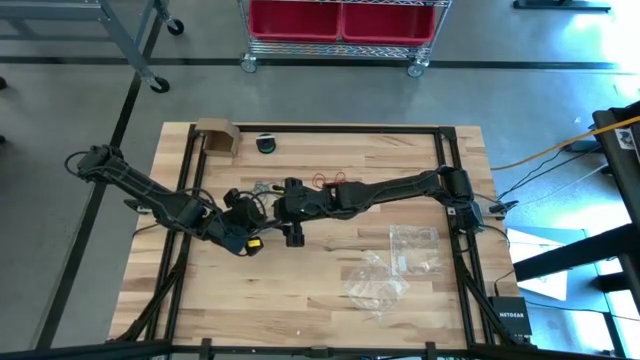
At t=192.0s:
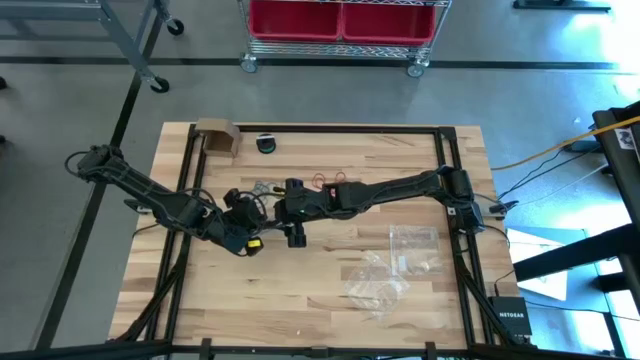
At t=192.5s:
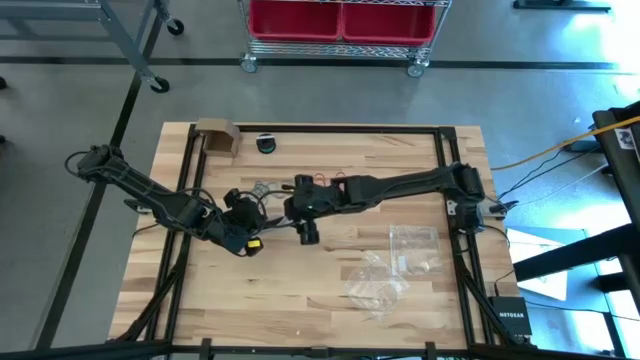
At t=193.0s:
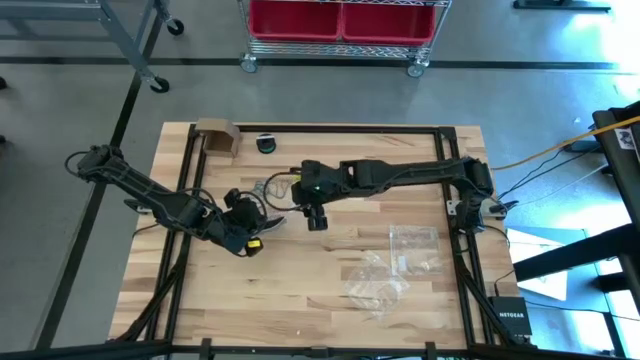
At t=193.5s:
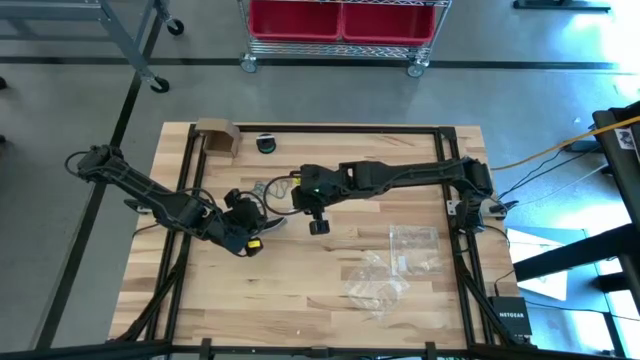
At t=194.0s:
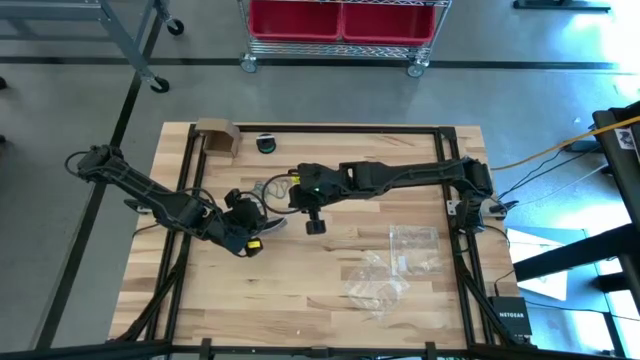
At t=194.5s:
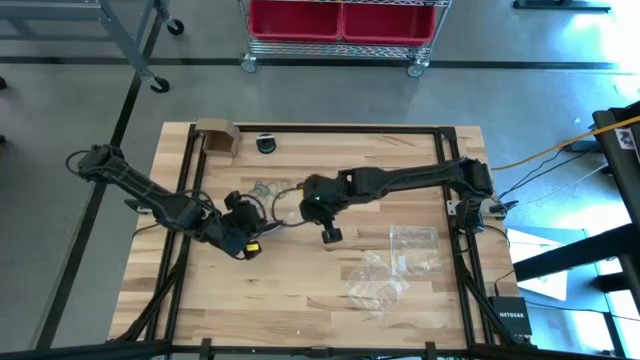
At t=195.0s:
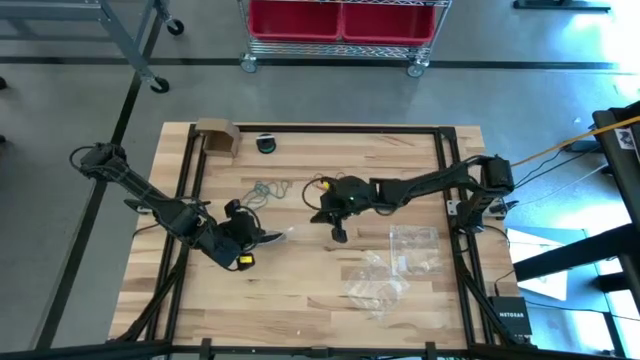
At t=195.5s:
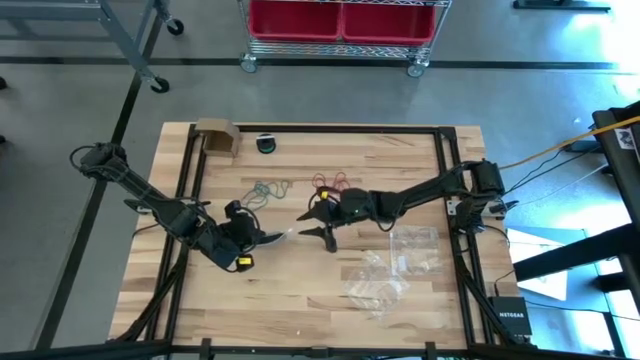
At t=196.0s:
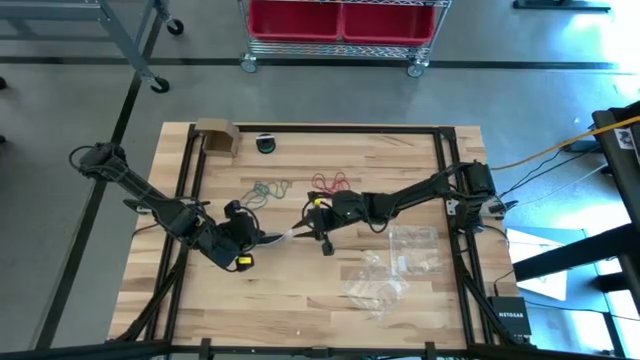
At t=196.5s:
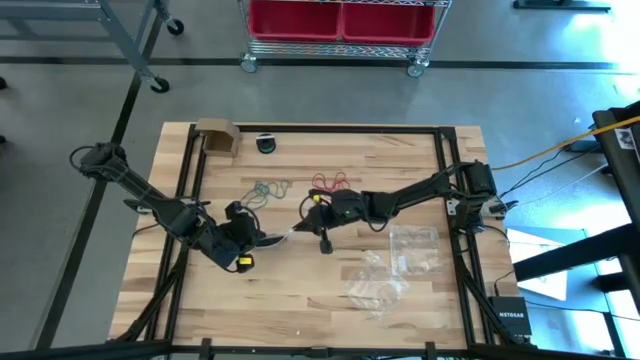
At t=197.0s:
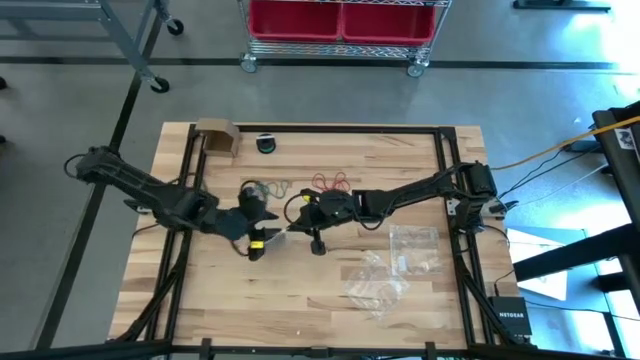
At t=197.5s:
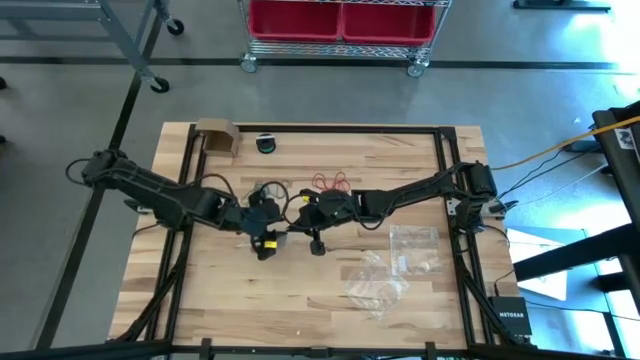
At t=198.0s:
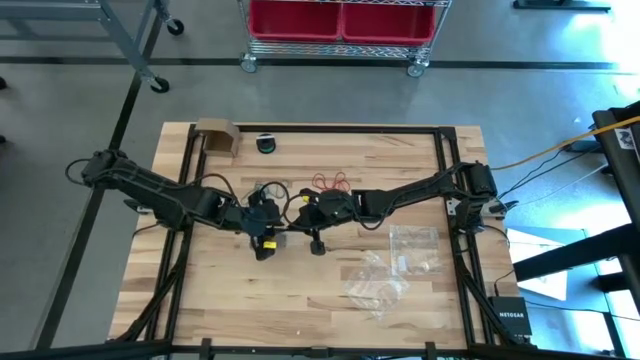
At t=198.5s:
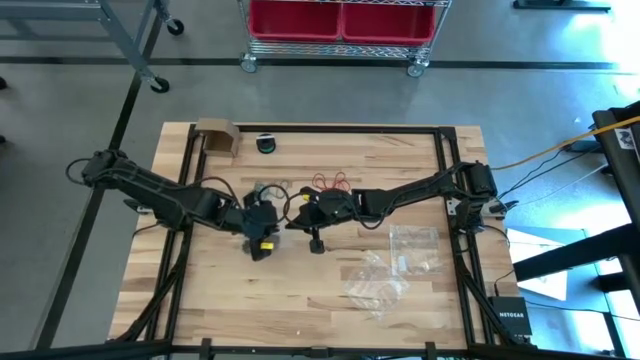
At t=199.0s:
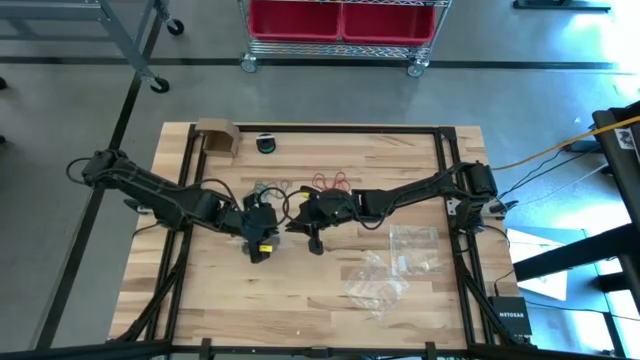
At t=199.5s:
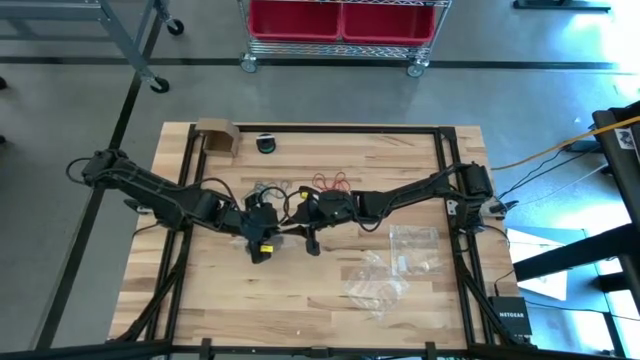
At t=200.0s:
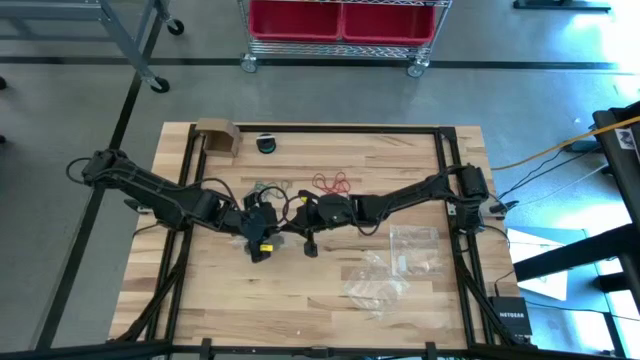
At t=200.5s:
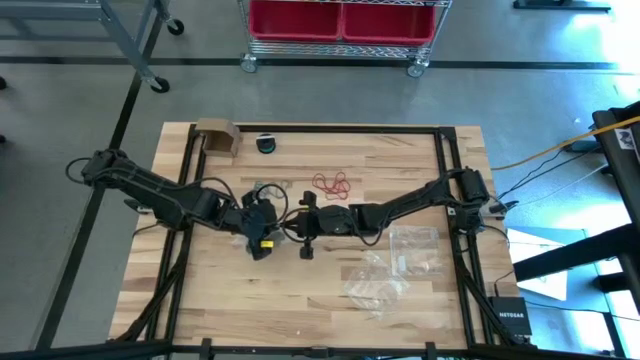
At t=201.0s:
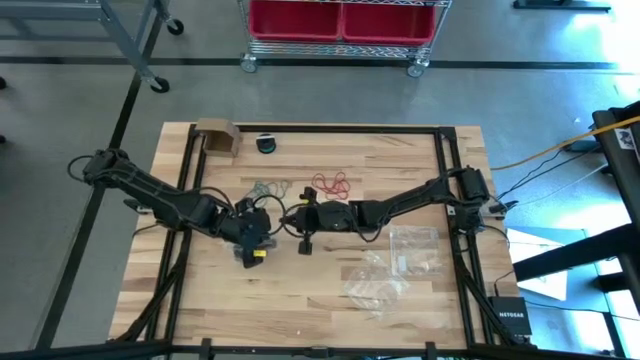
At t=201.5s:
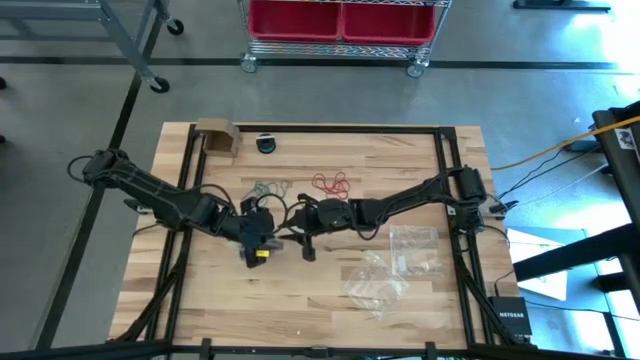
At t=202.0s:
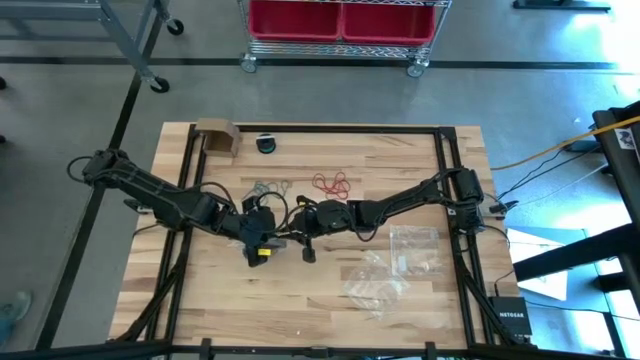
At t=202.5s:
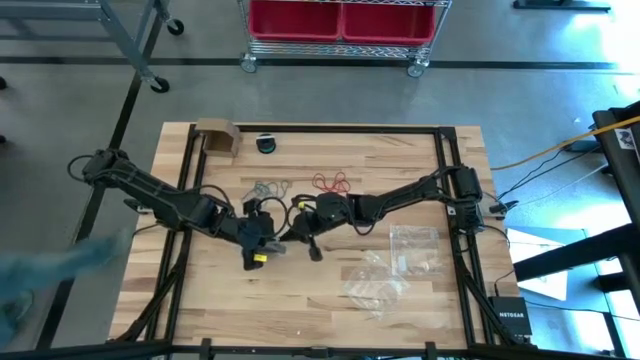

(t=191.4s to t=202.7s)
Task: Sort rubber bands
Close the transparent zip bag

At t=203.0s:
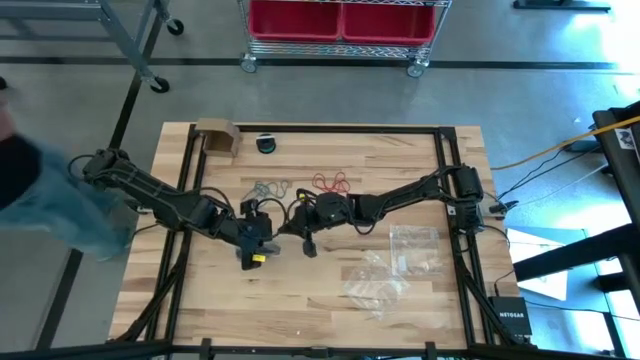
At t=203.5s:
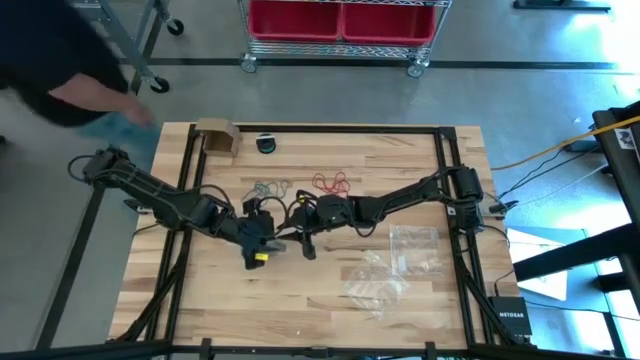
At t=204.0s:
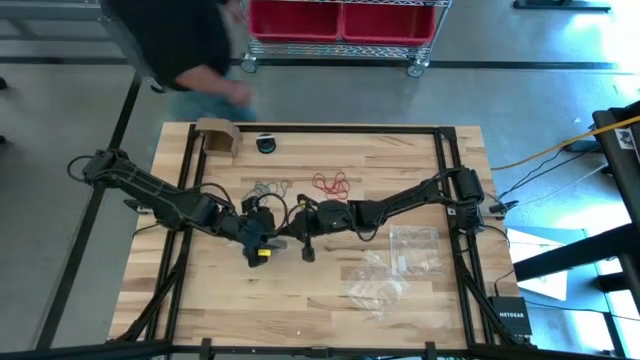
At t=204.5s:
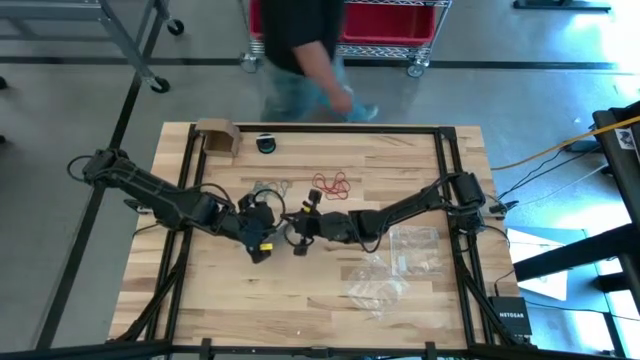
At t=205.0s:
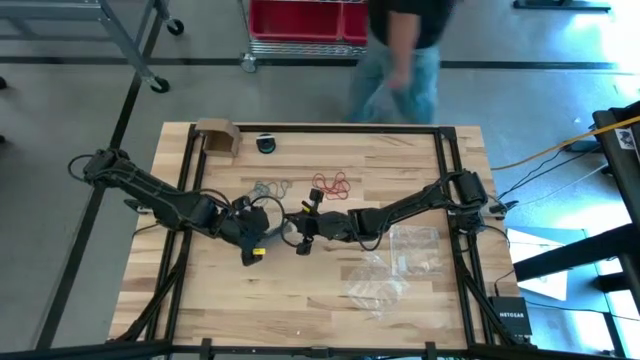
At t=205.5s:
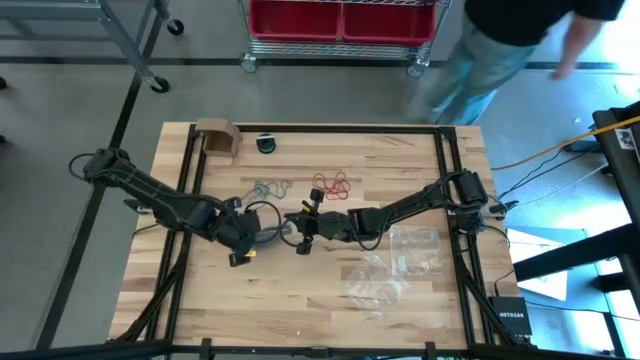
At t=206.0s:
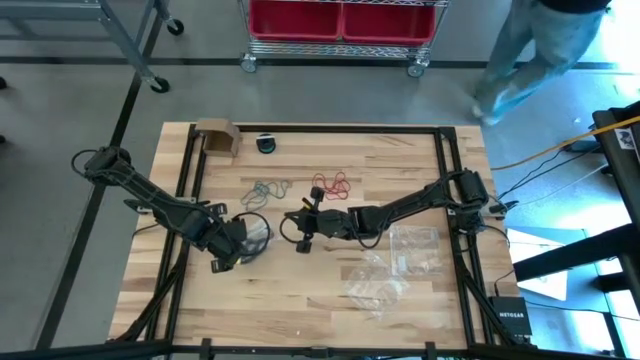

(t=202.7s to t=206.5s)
Close the transparent zip bag

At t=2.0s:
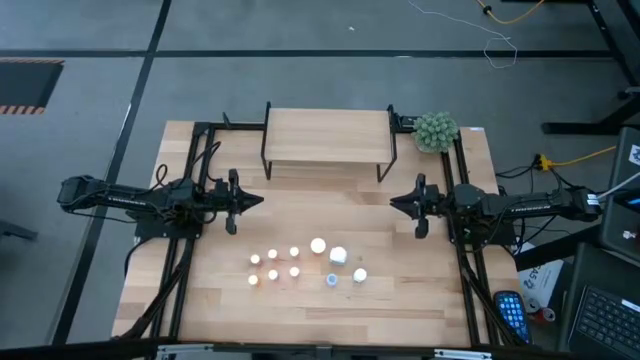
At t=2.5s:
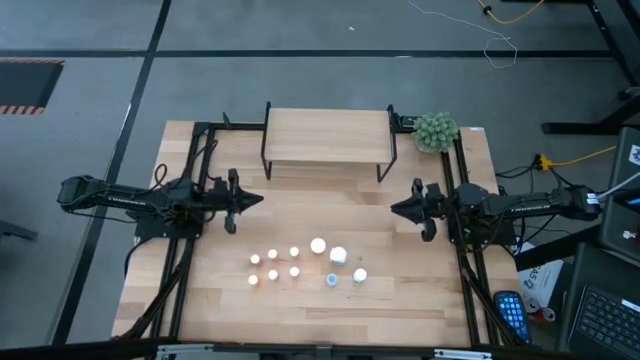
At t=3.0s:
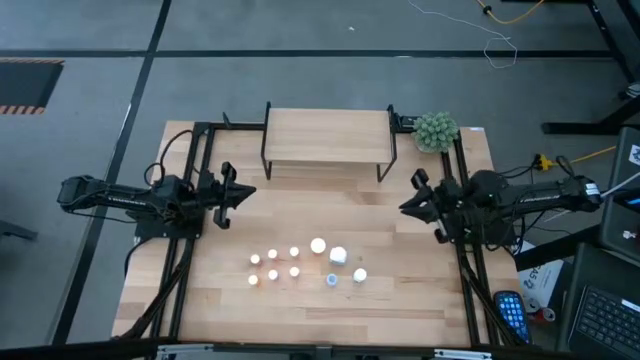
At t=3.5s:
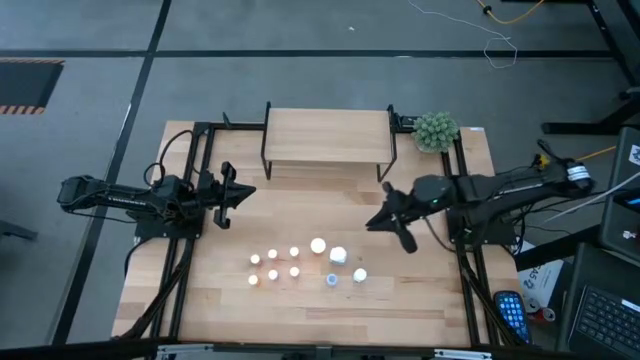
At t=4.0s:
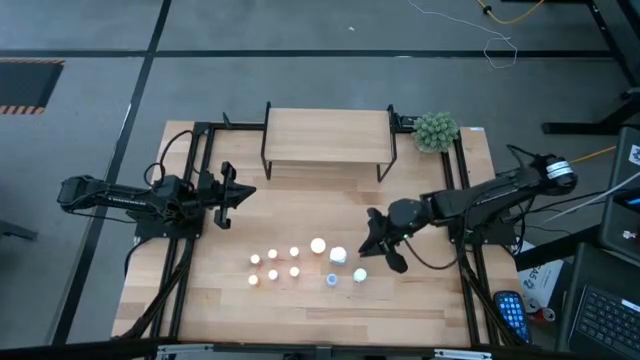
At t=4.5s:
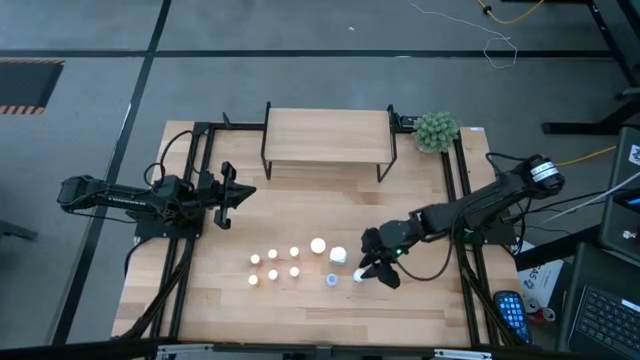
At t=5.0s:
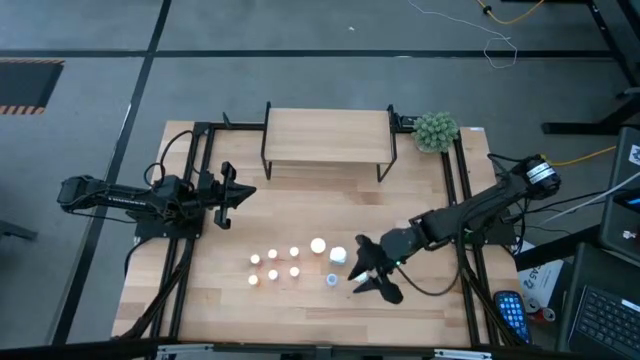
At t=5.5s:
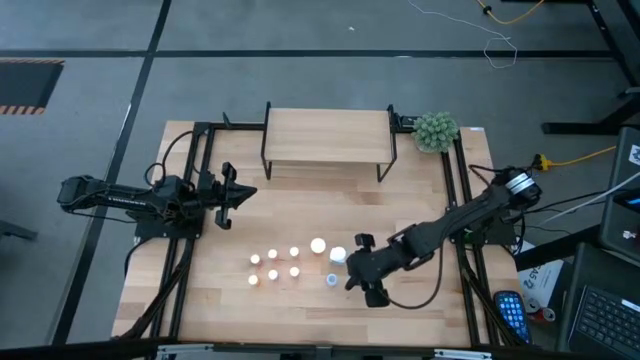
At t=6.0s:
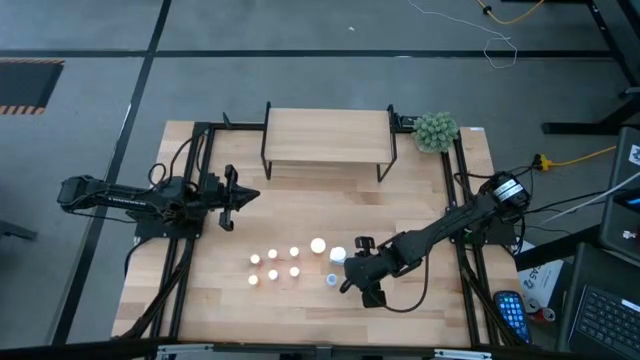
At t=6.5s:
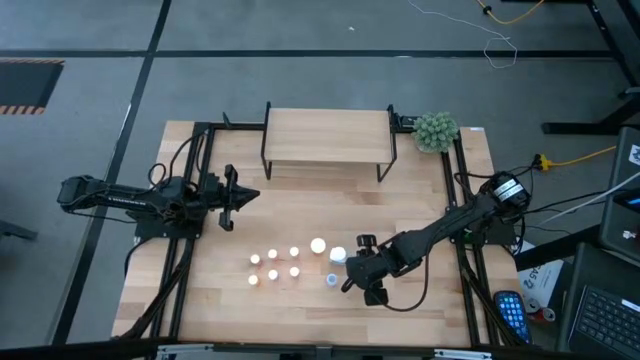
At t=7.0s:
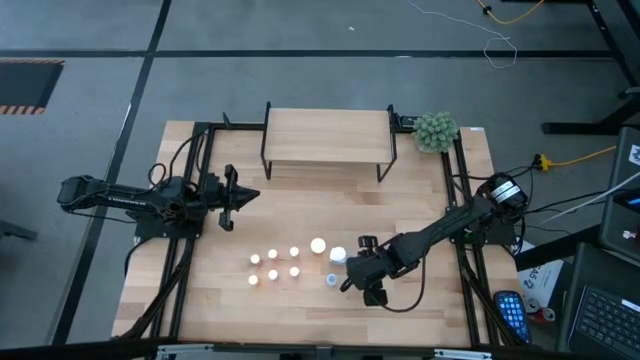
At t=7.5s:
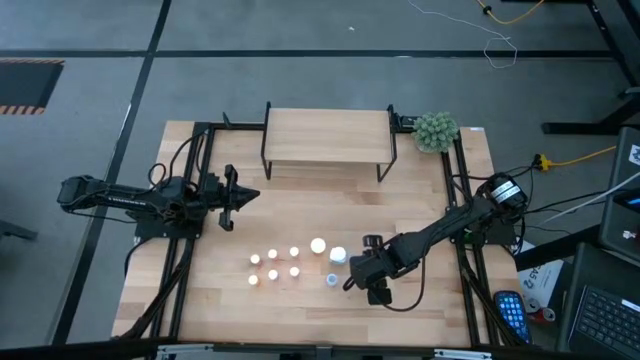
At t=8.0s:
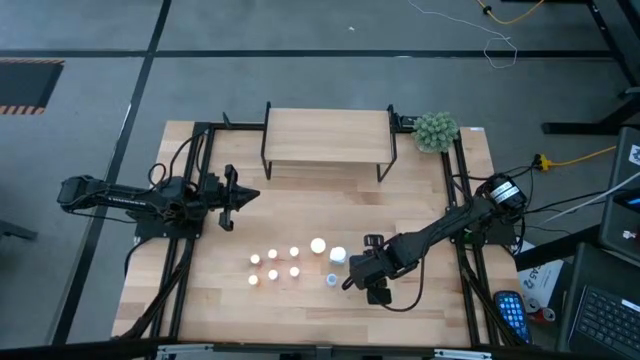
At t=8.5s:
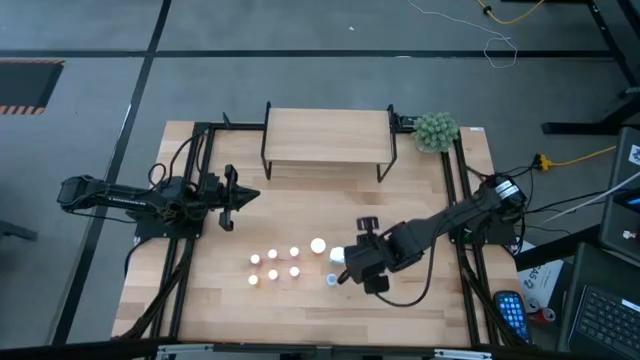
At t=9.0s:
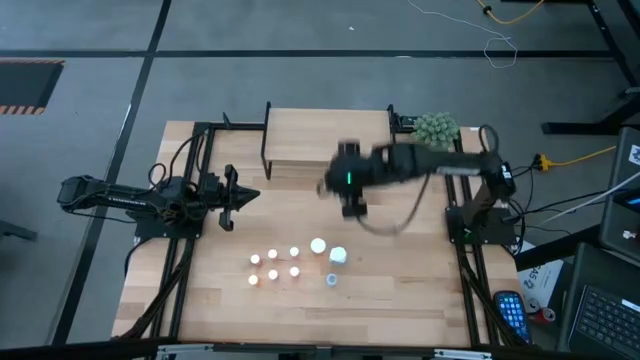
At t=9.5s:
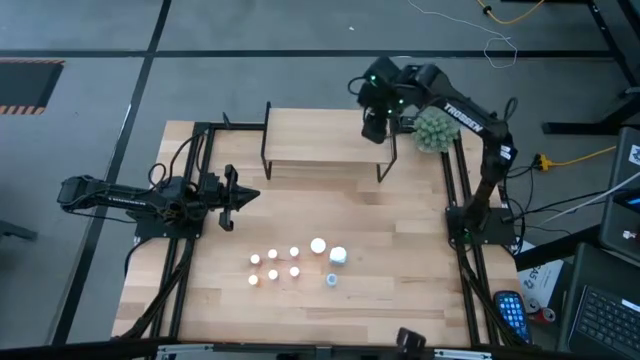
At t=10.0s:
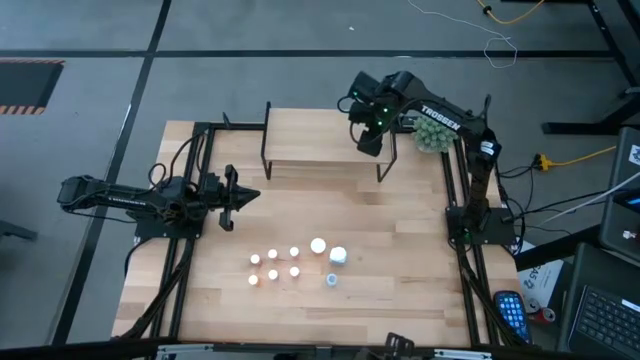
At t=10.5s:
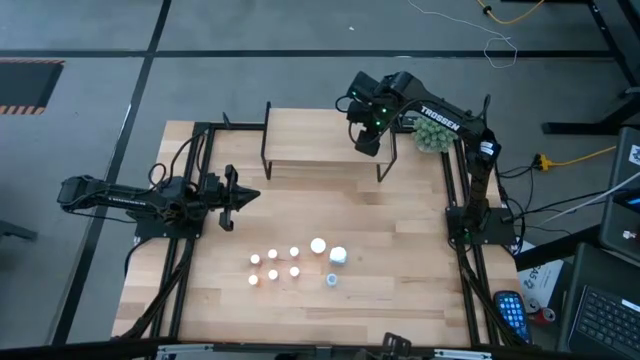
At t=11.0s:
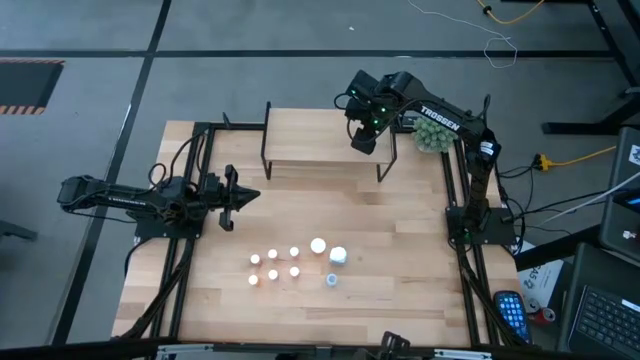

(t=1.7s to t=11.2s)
Task: Pick and place medicine bottles onto shelf by color
Put the small white pill bottle on the shelf
